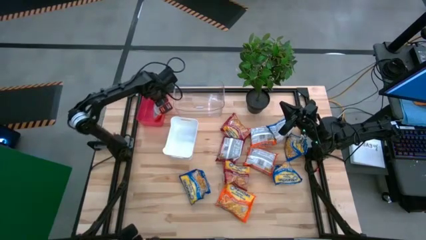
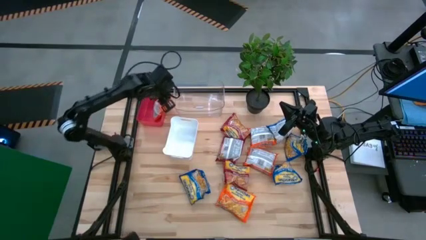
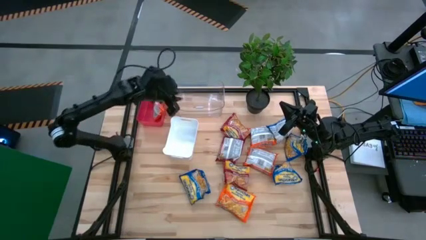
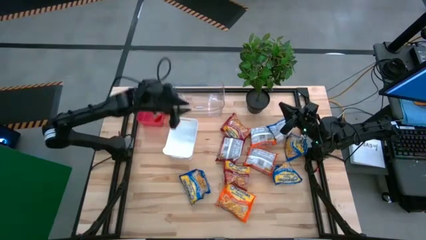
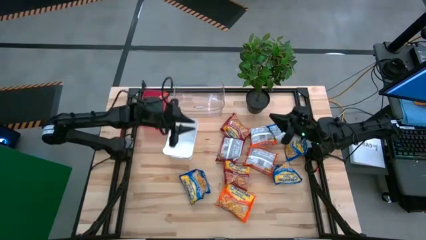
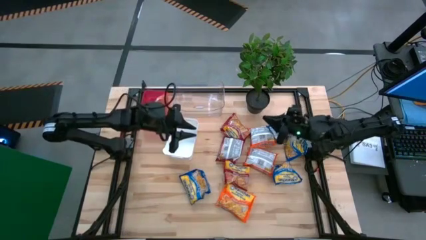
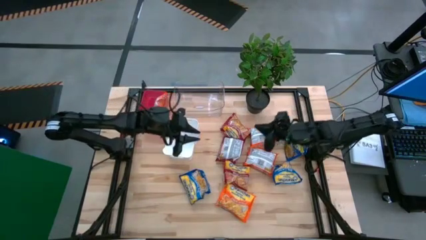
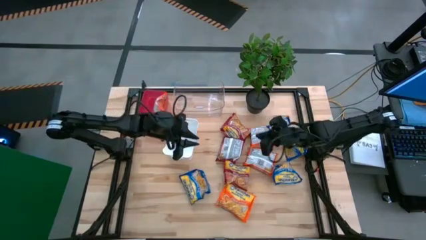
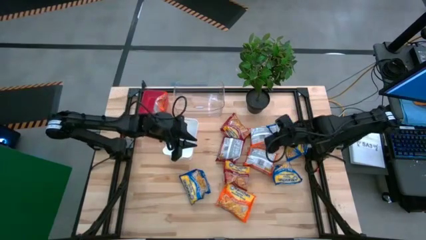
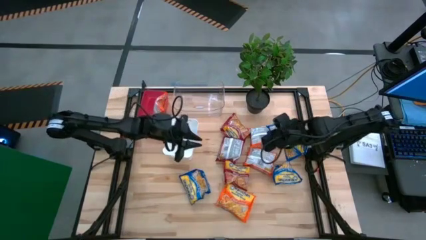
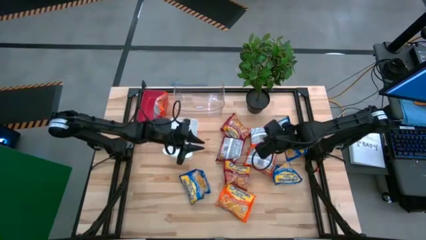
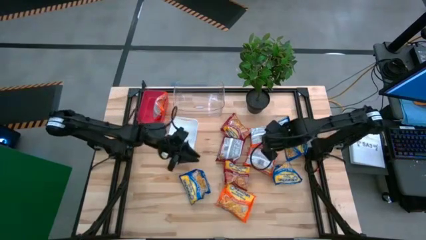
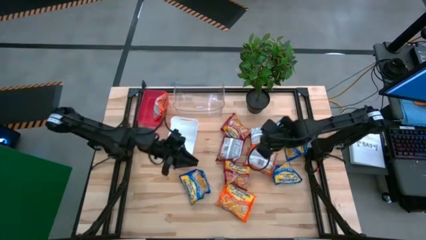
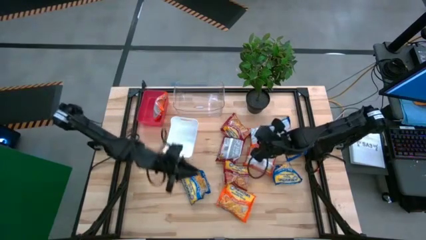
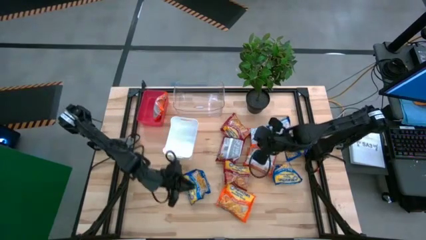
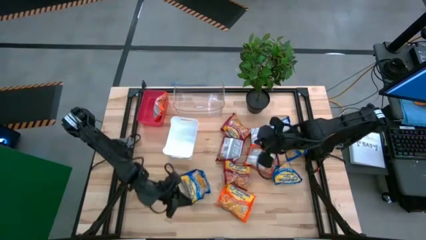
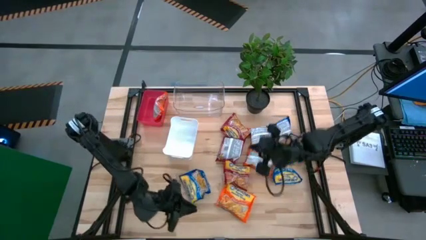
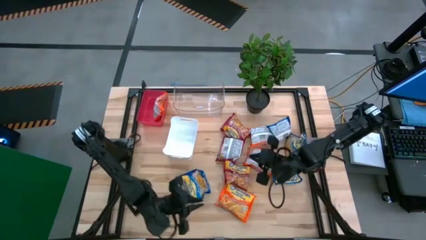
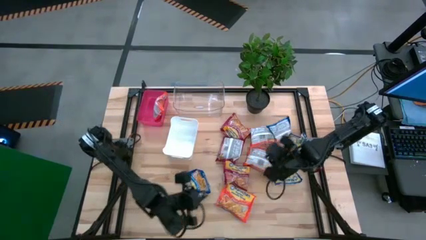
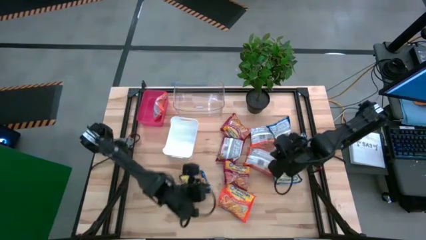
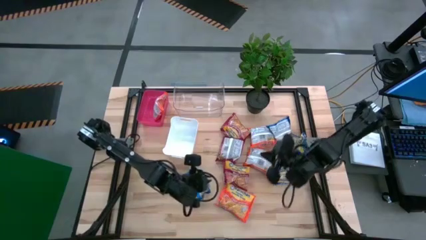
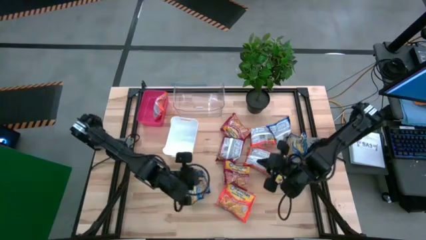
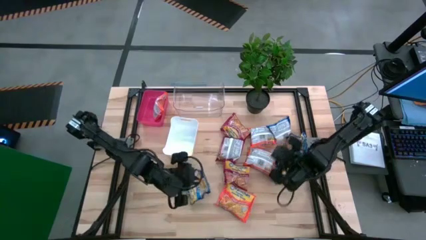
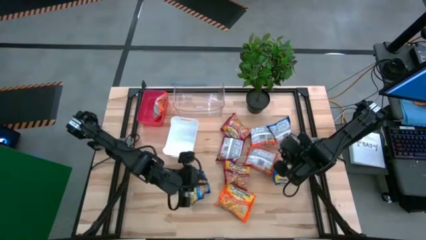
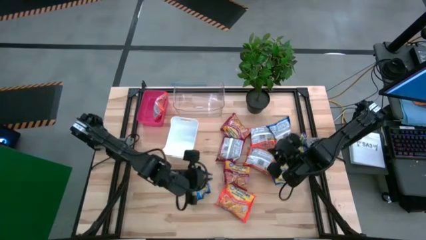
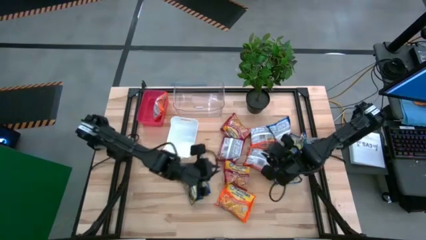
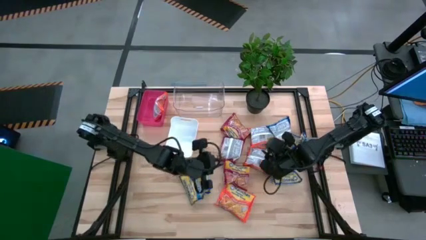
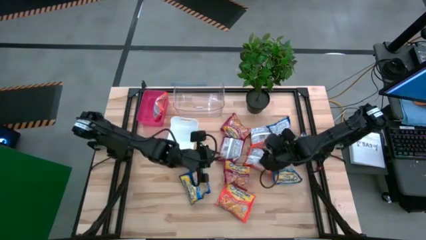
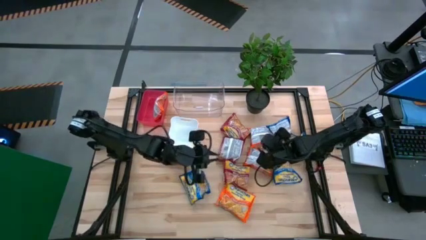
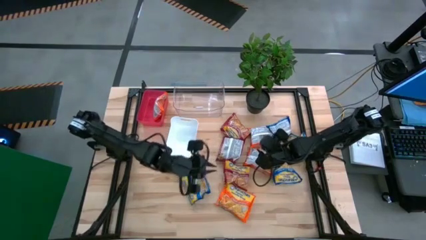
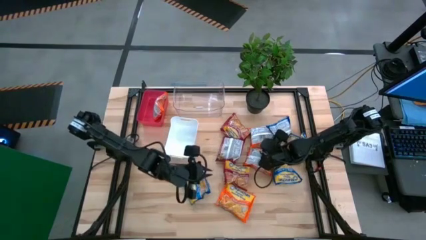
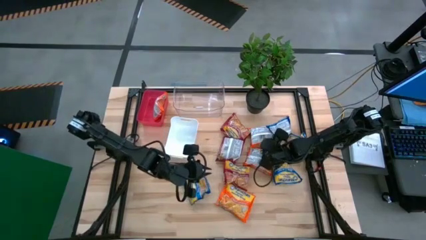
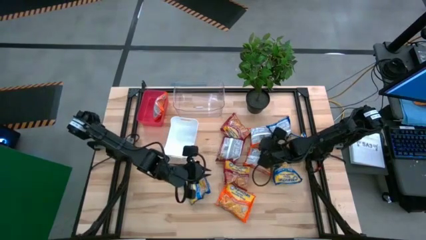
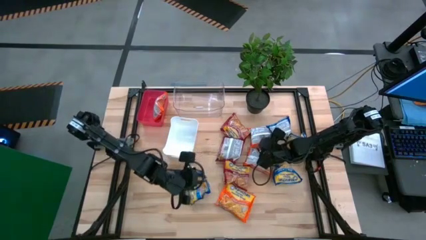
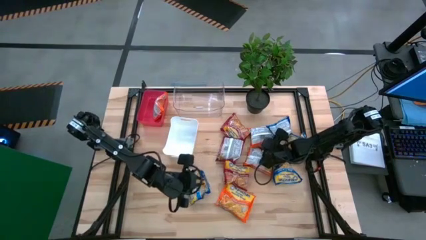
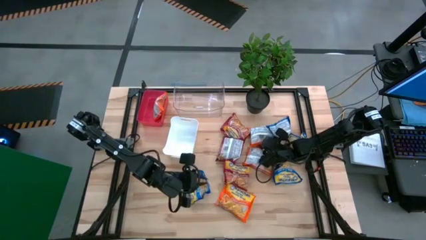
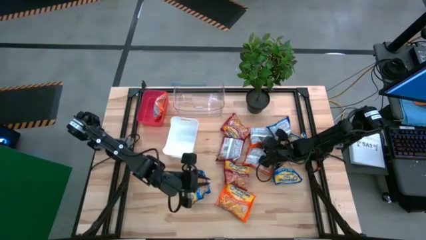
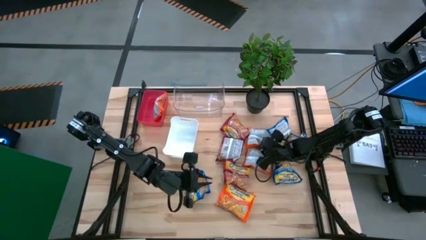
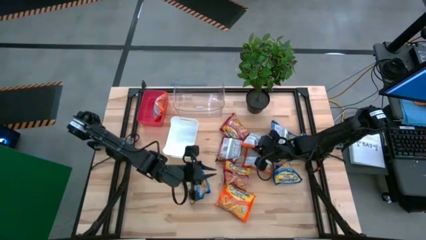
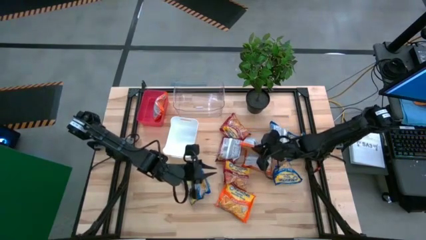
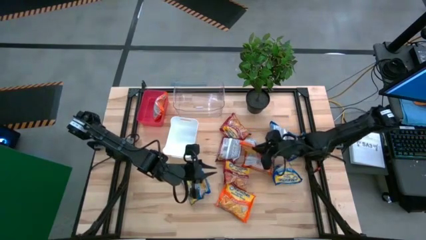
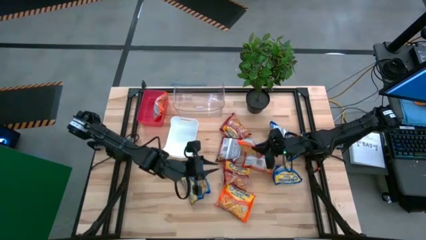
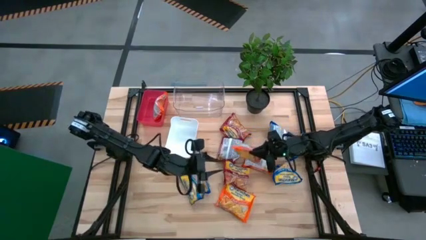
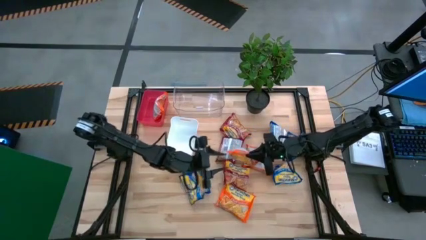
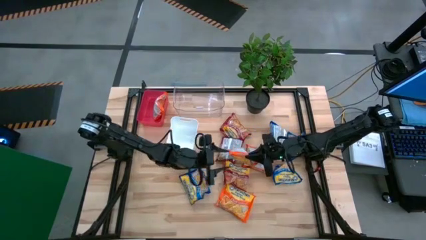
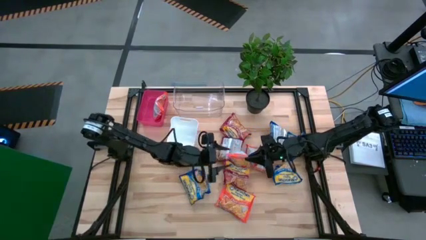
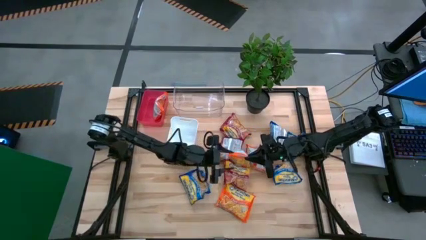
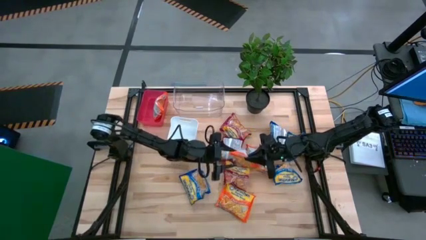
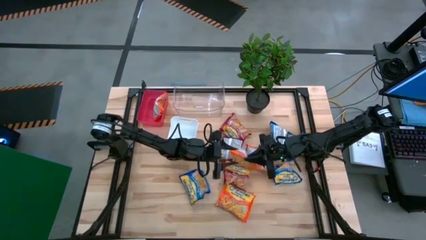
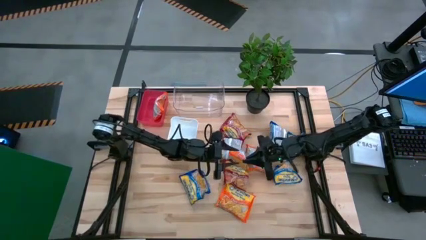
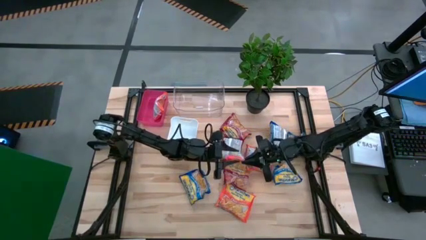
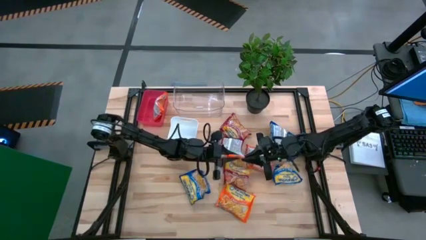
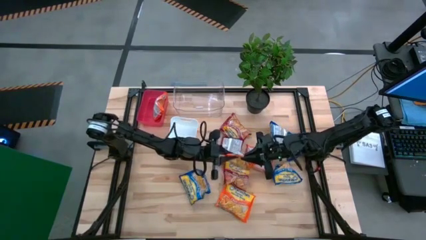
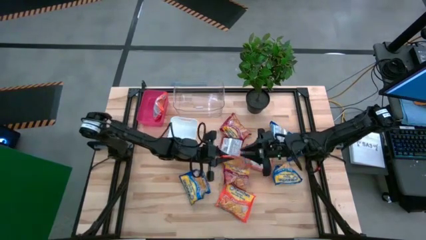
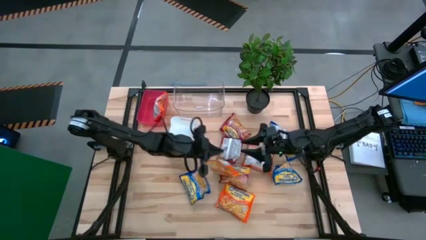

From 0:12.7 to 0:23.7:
Task: Sort Maruchan noodles
Put the orange noodle pack into the red bin

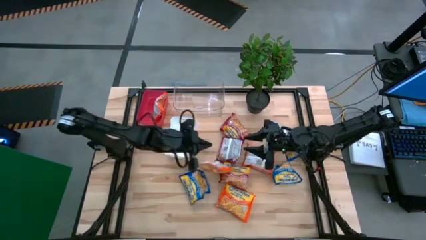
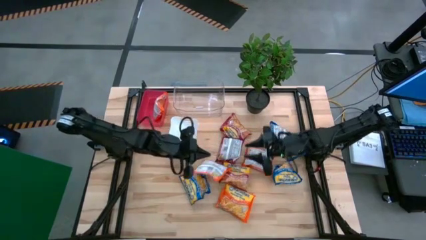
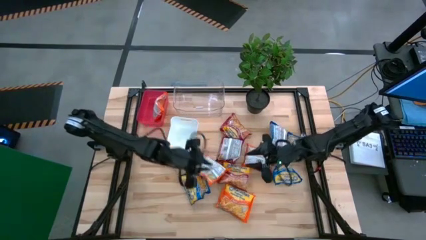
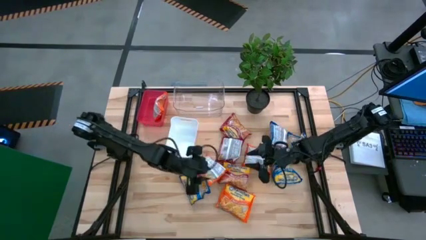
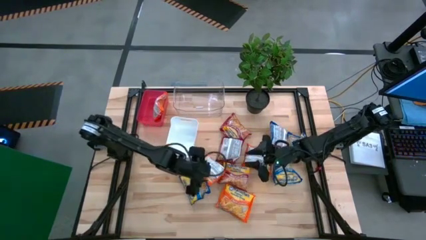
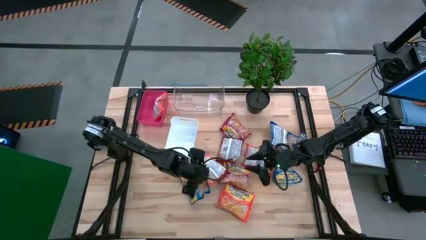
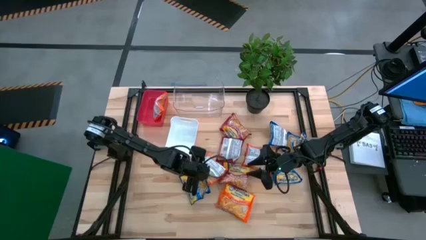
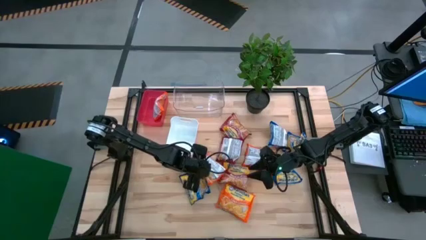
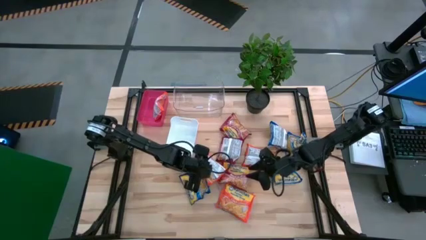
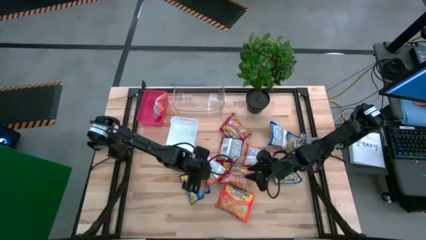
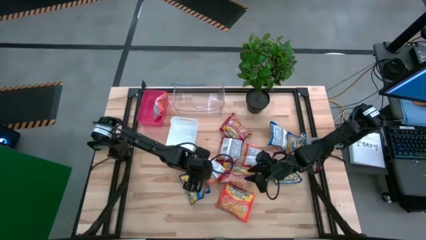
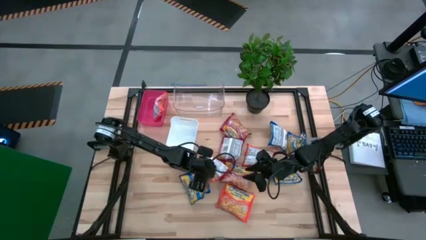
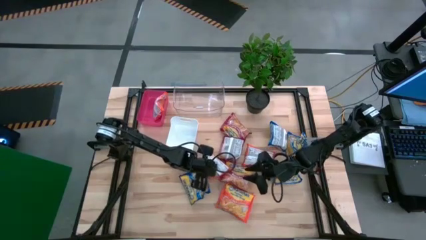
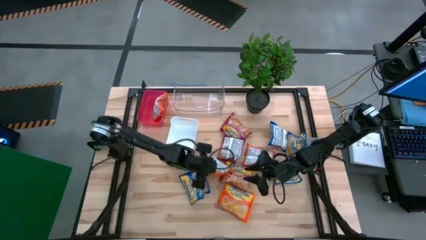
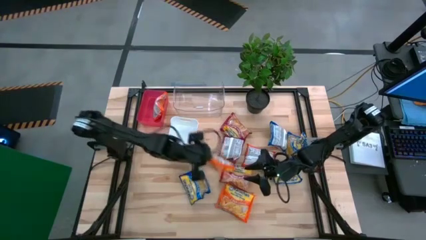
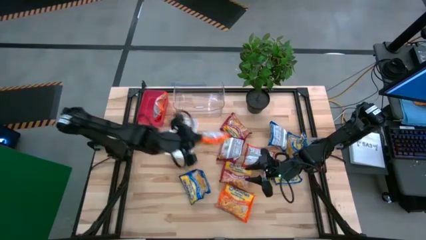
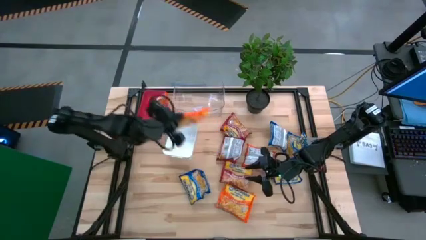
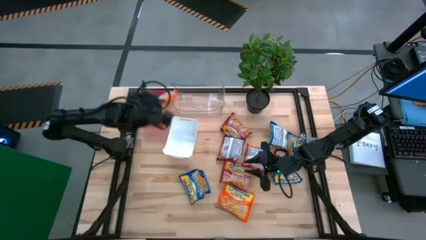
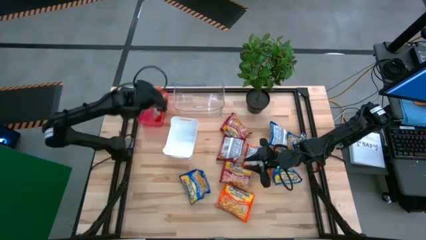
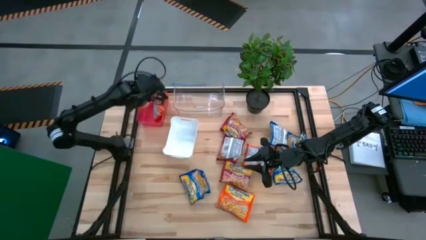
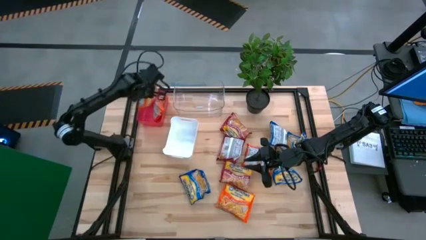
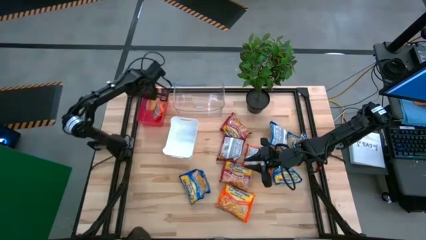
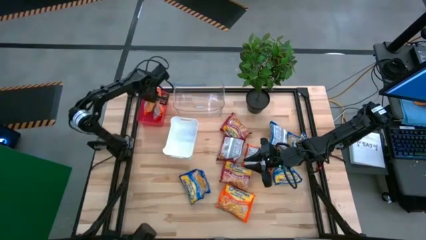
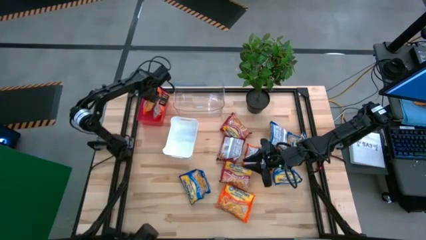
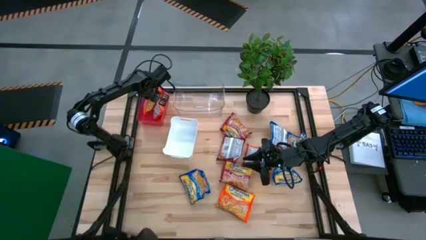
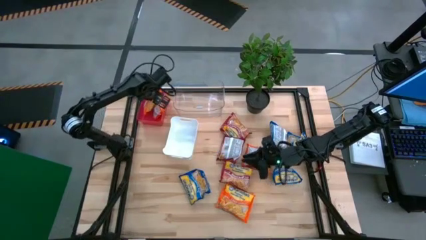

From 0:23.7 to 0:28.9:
Put the orange noodle pack into the red bin

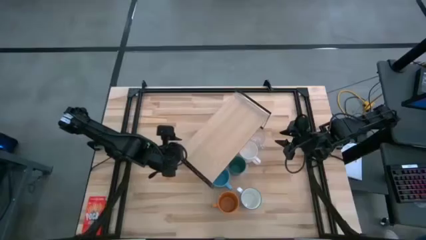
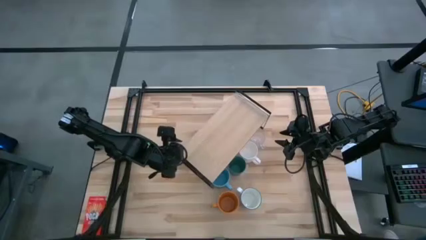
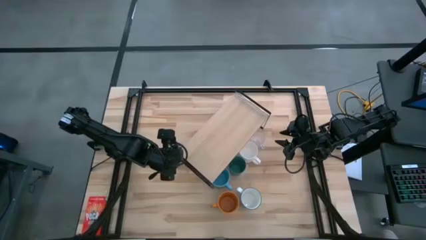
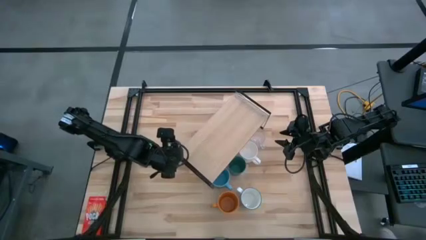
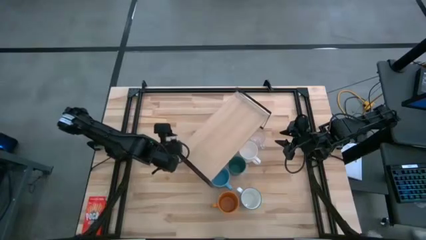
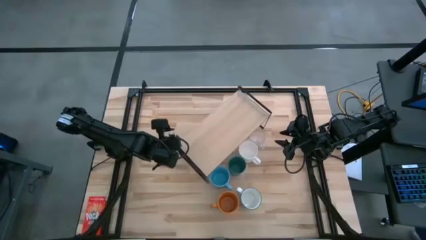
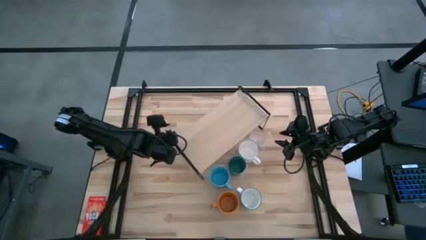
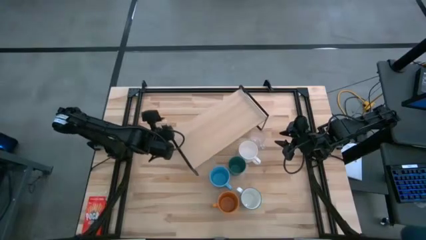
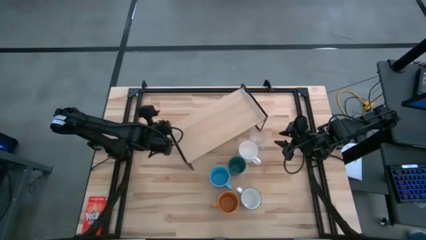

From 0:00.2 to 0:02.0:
Task: Stack small to large cups/mugs on shelf
Adjust the shelf
